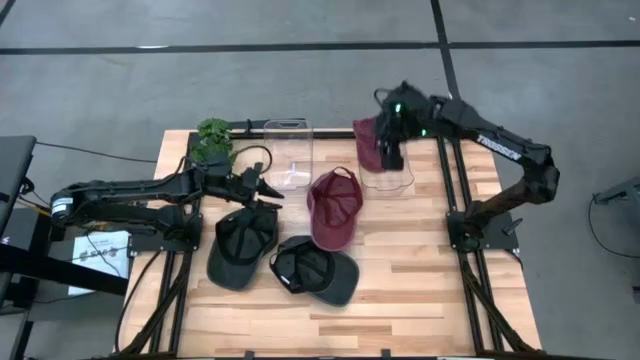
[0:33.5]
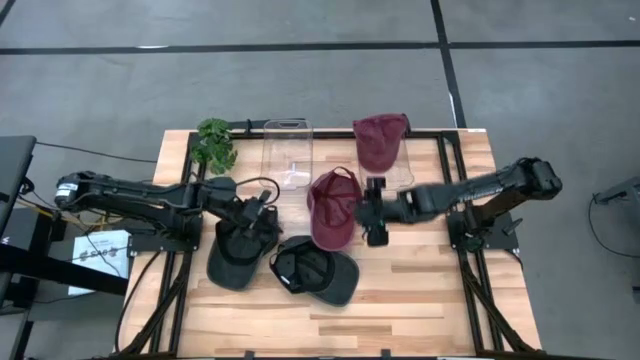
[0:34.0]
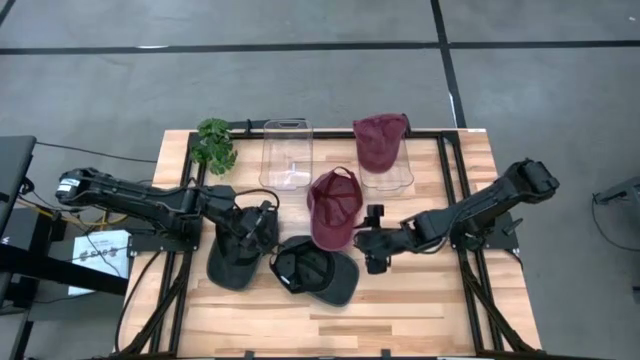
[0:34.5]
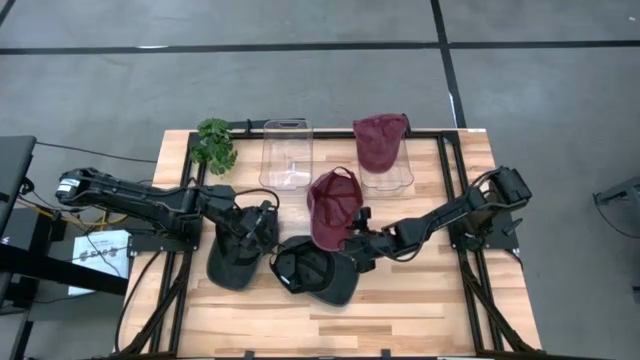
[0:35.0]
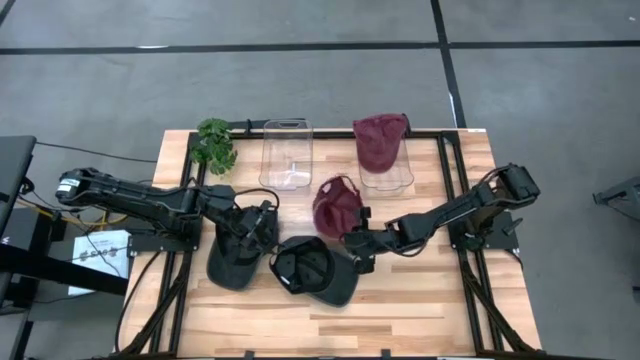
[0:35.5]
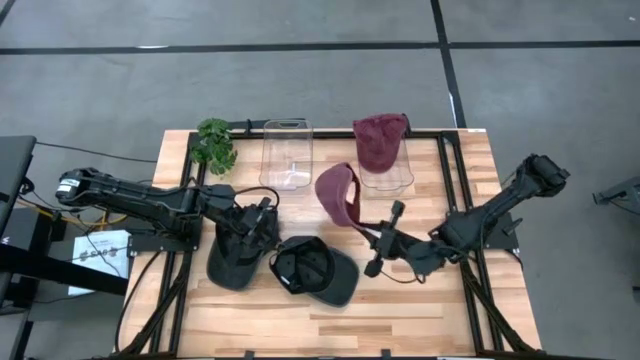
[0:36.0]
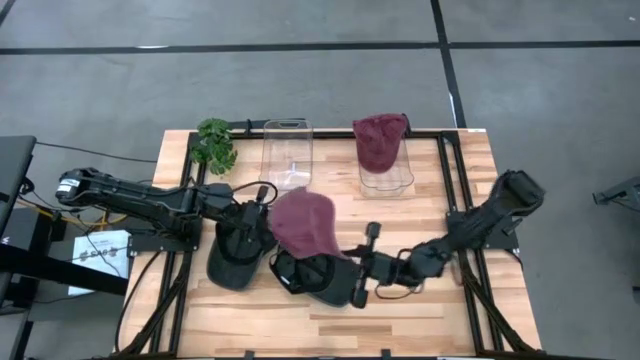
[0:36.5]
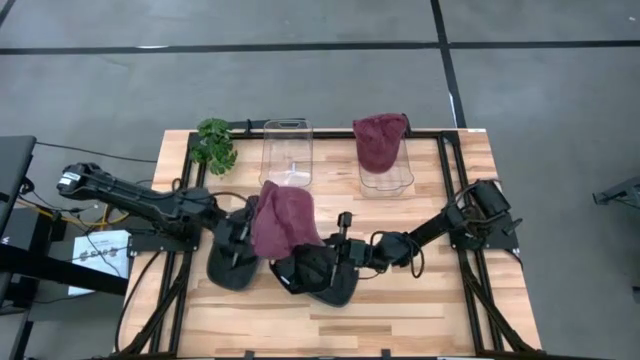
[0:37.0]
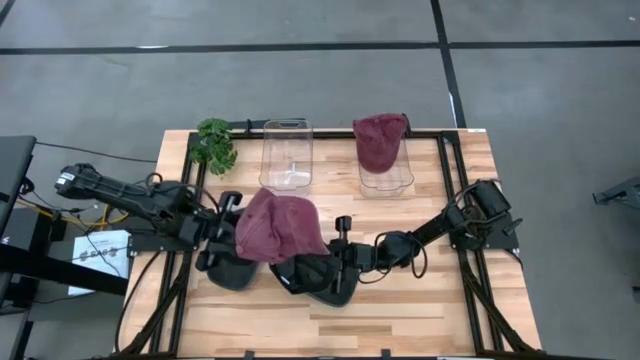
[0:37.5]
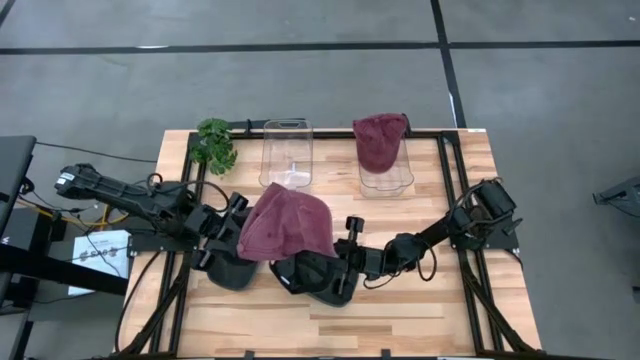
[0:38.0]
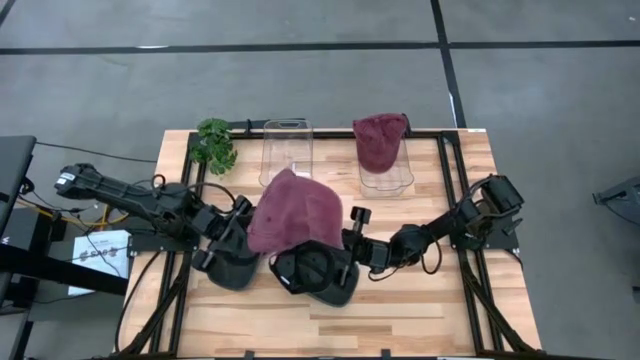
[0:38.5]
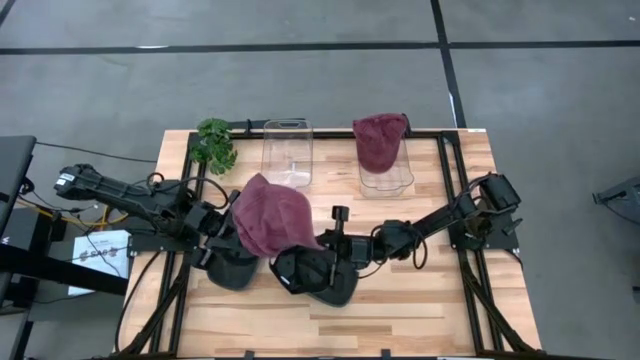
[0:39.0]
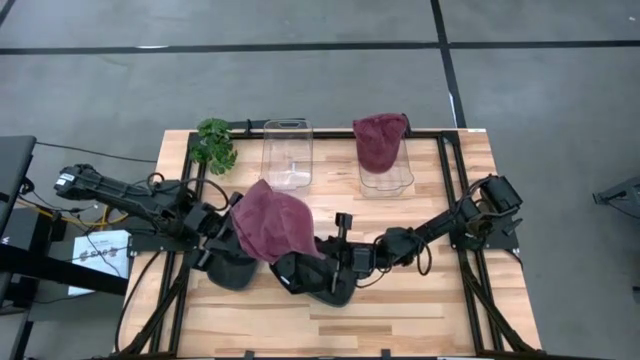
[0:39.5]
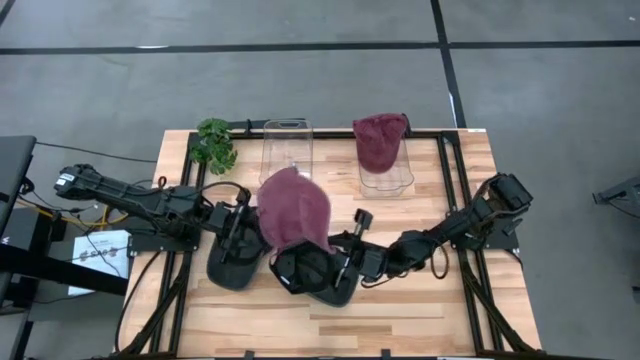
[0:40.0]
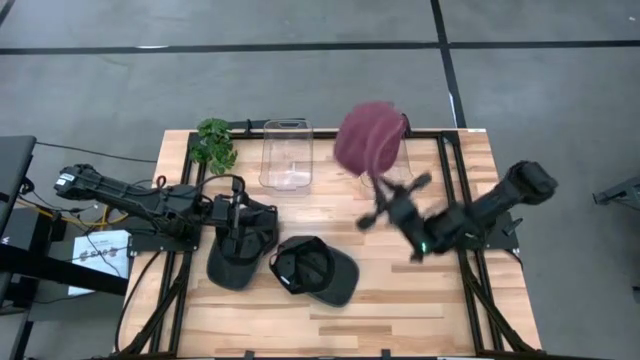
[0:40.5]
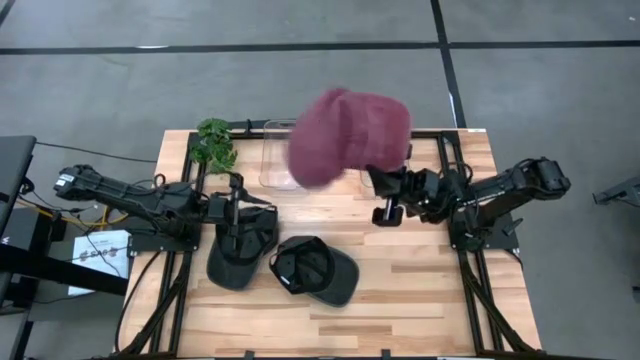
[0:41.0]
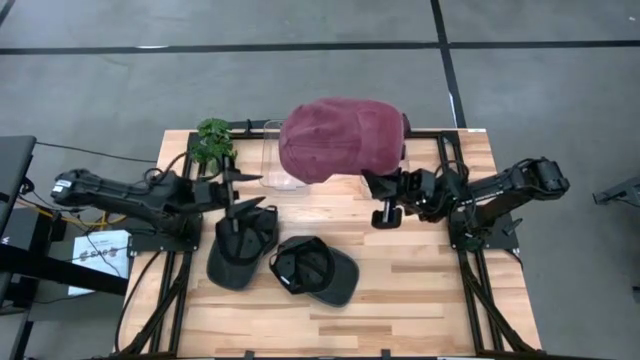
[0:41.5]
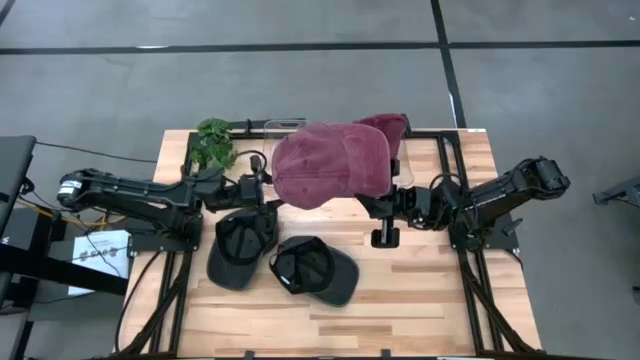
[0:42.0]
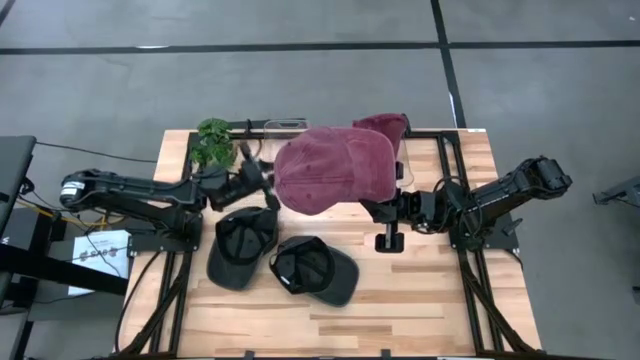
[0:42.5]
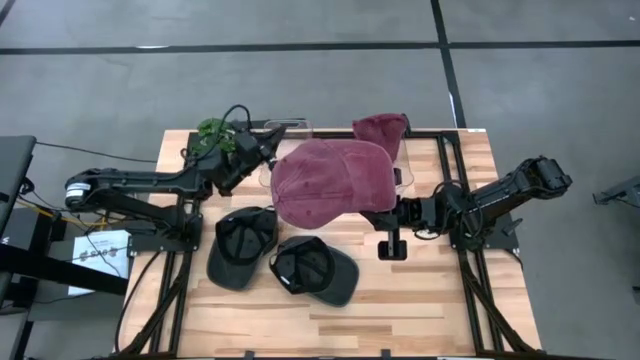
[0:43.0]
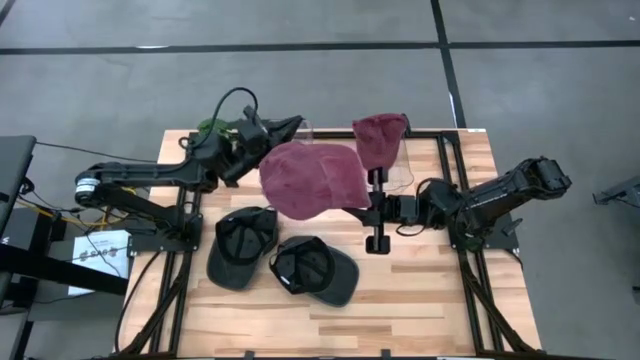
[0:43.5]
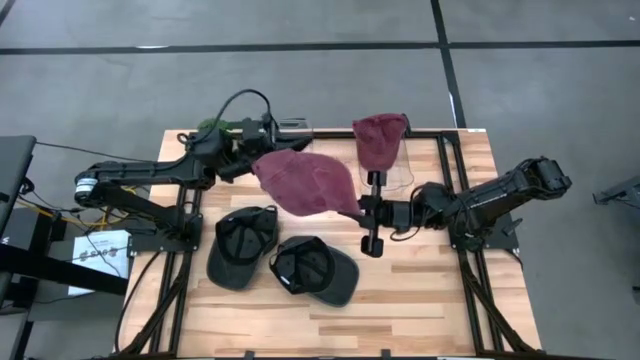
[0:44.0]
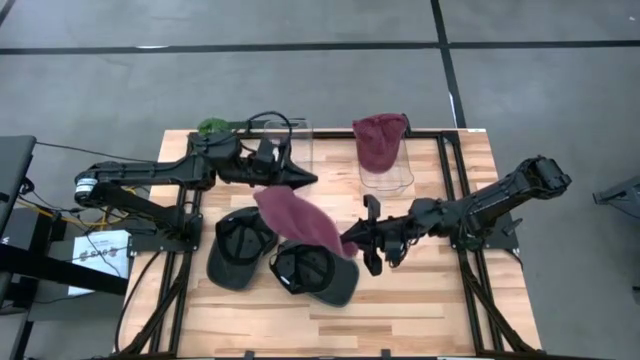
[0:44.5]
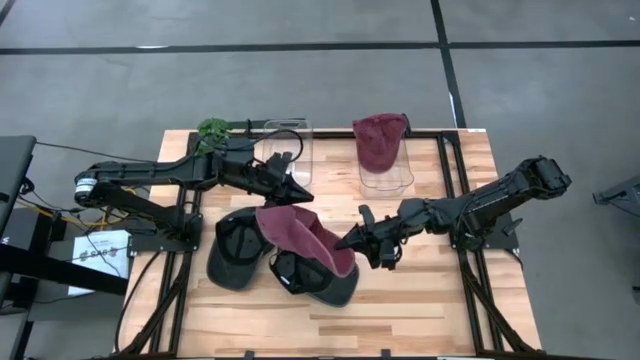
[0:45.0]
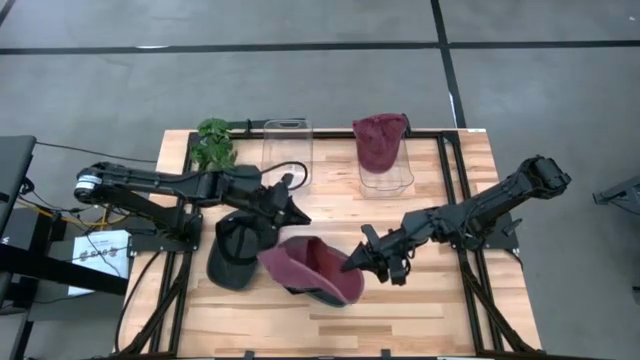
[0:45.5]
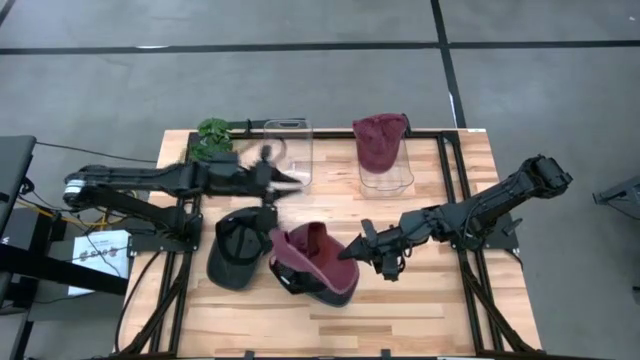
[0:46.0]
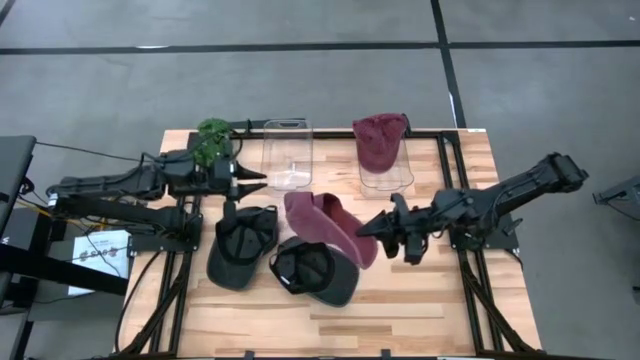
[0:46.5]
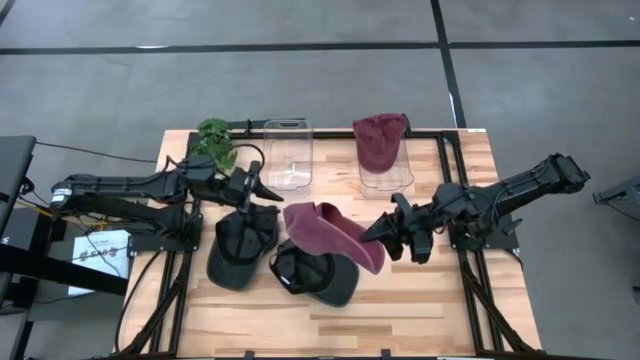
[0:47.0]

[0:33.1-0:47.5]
Task: Pick & Place hat
Put the red cap into the right transparent bin

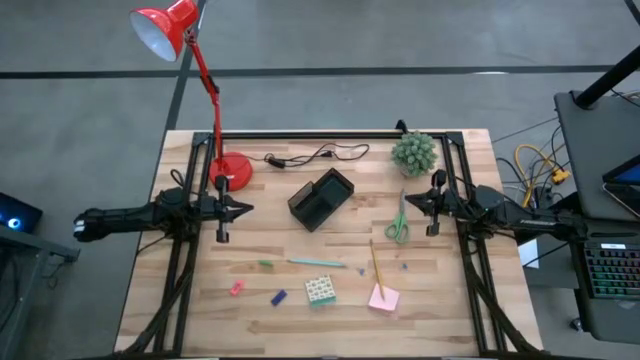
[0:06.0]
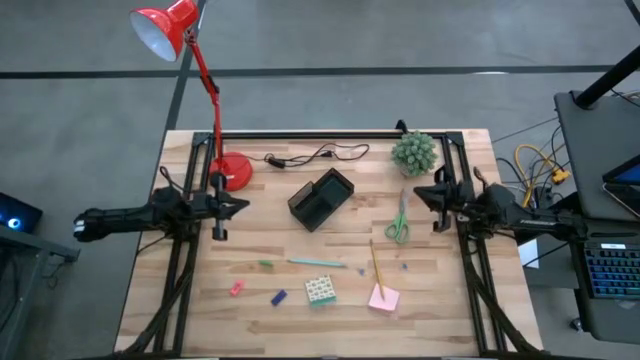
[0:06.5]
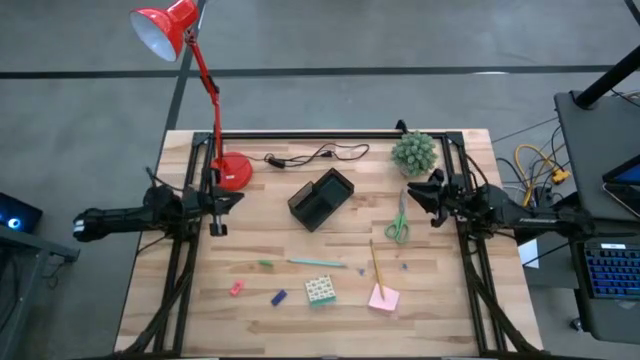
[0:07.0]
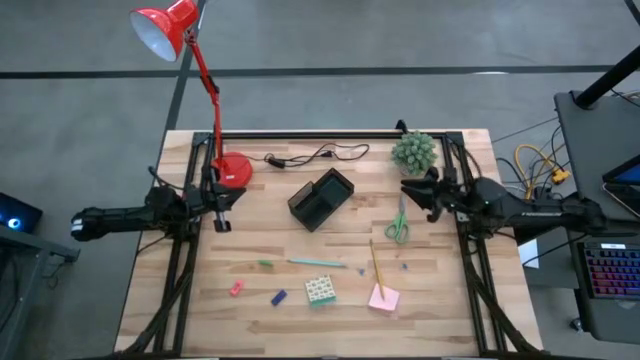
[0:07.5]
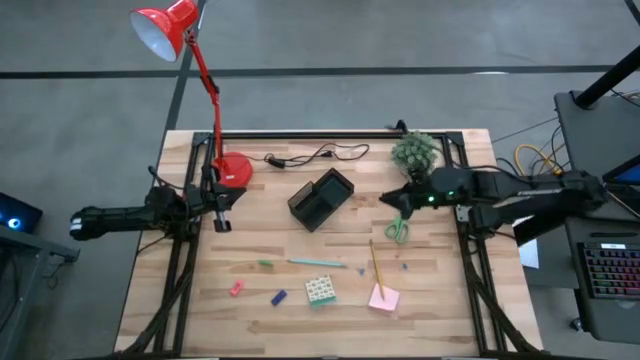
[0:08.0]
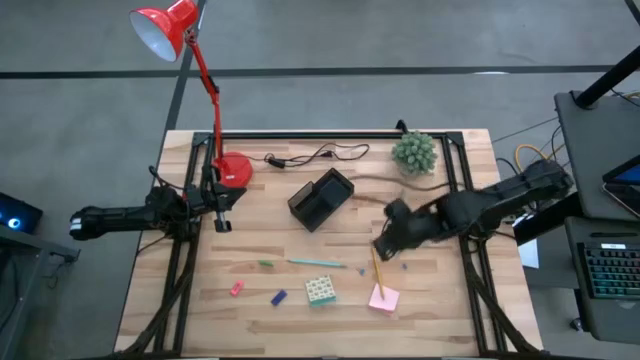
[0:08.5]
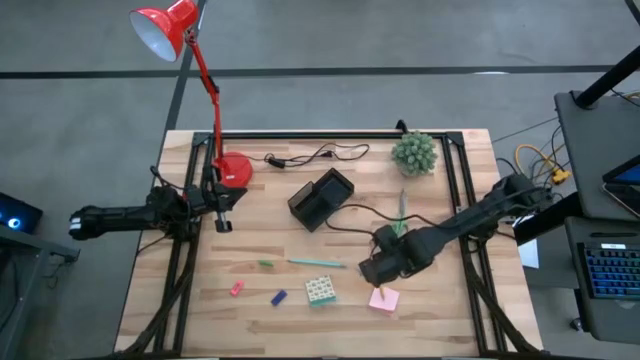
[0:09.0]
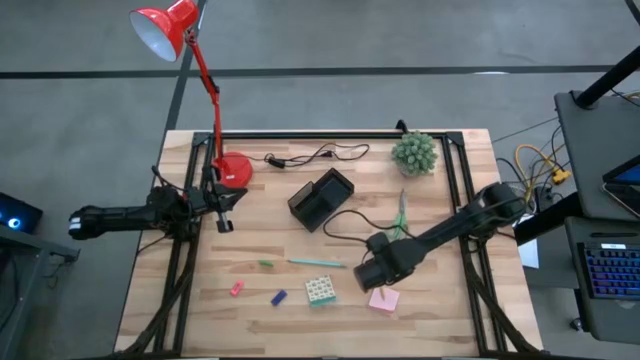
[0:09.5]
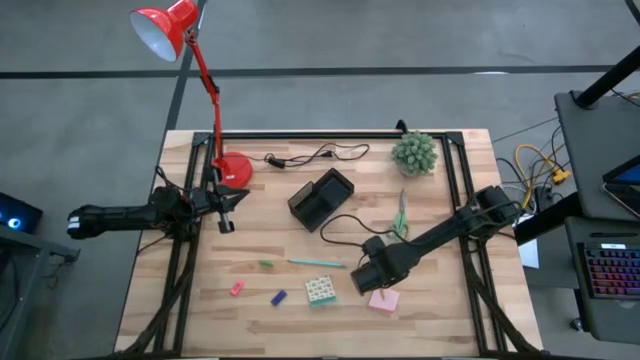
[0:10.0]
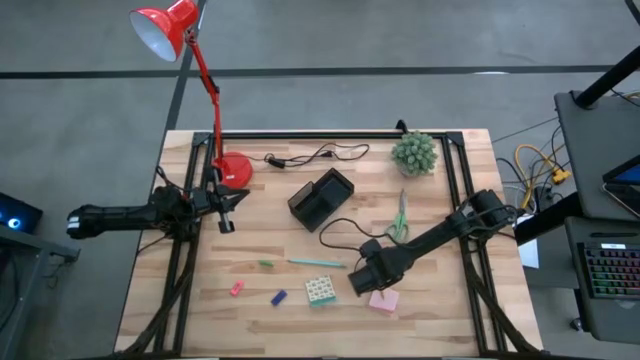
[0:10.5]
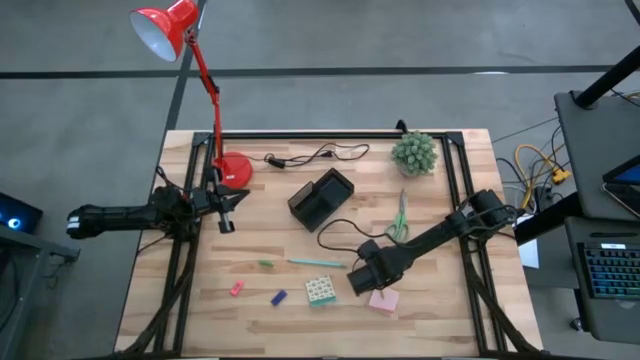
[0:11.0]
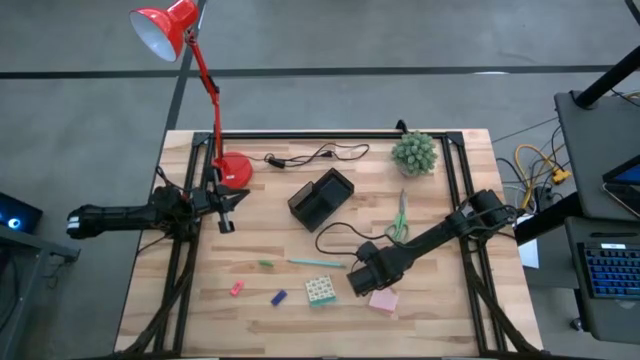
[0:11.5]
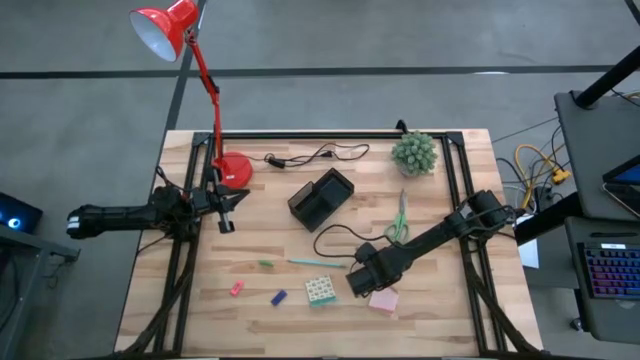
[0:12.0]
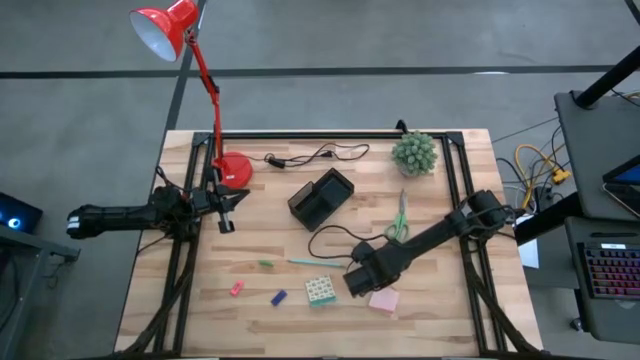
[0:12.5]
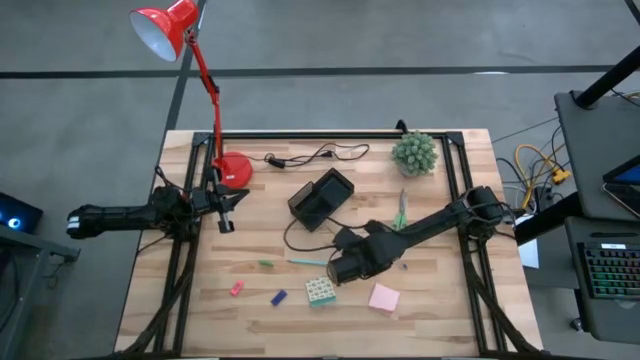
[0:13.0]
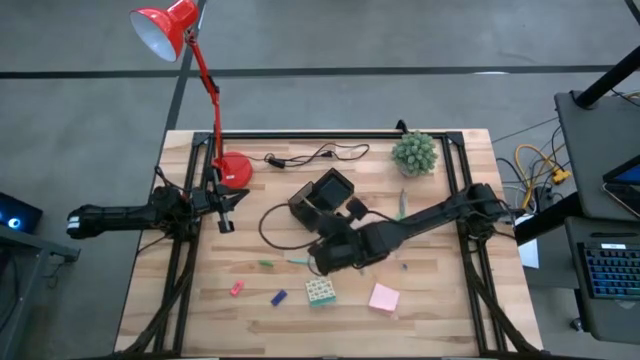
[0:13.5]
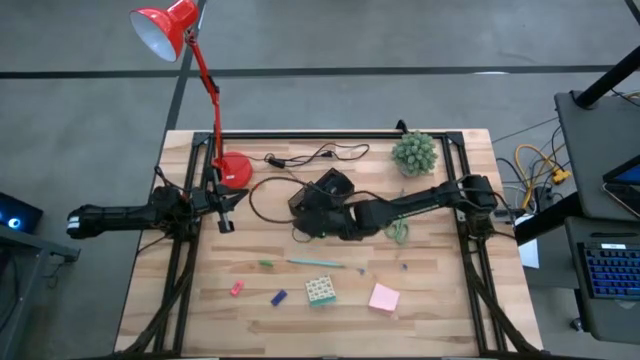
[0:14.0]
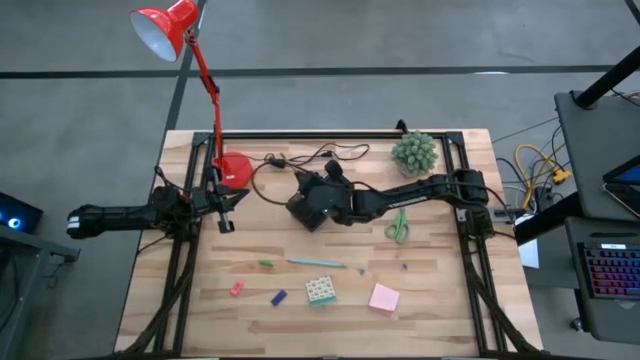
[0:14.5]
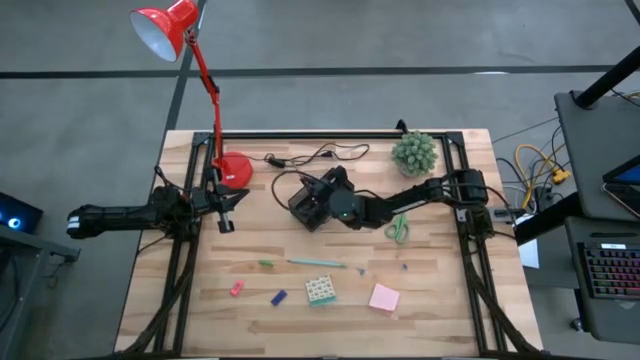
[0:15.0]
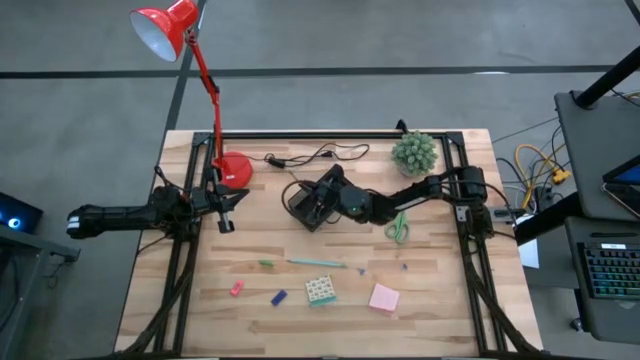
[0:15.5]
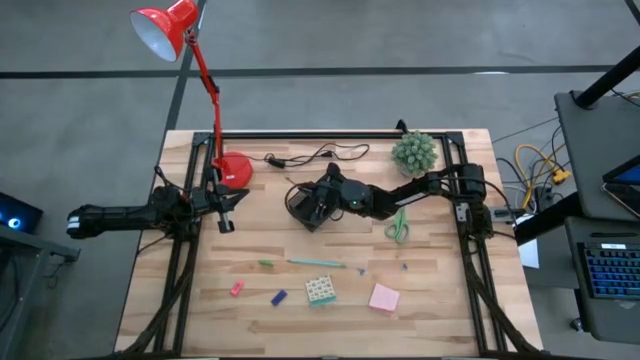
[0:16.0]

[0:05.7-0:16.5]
Task: Pick and place office supplies into organizer
Put the yellow pencil into the black desk organizer
